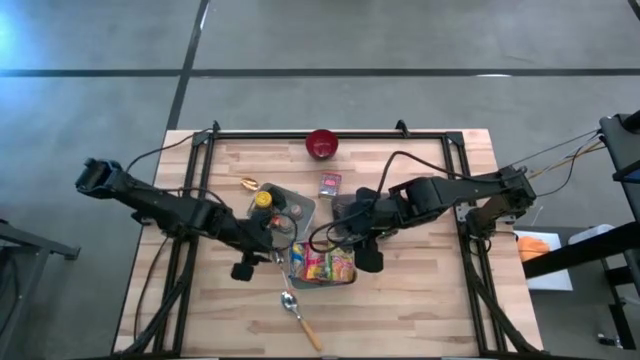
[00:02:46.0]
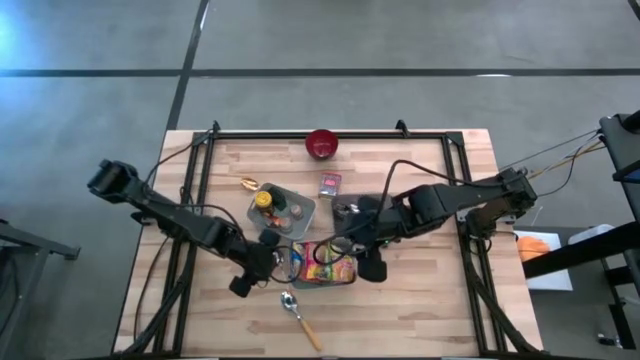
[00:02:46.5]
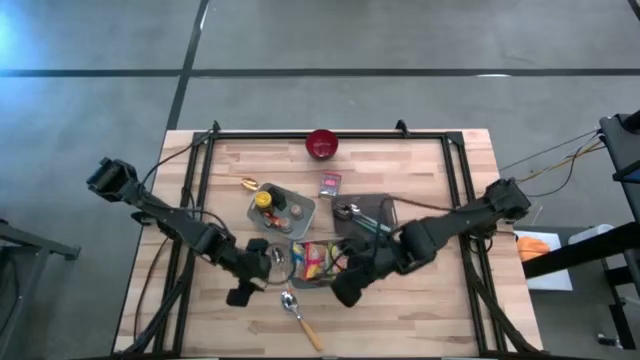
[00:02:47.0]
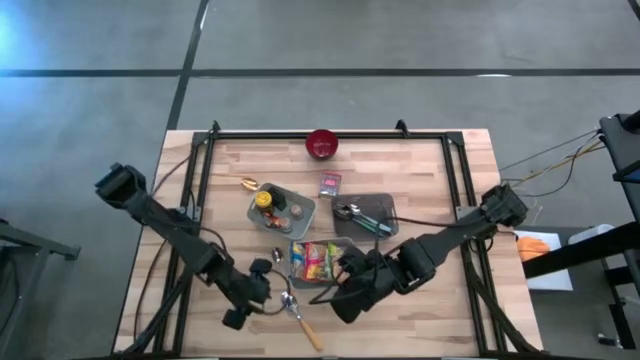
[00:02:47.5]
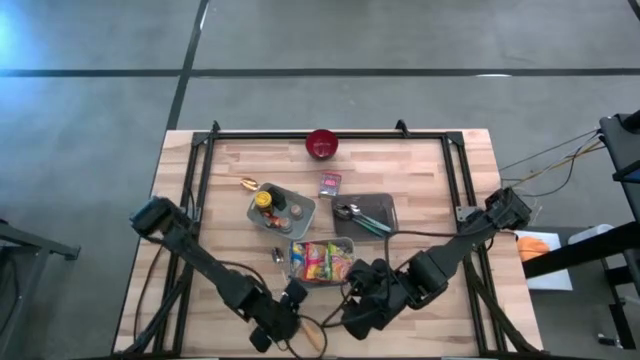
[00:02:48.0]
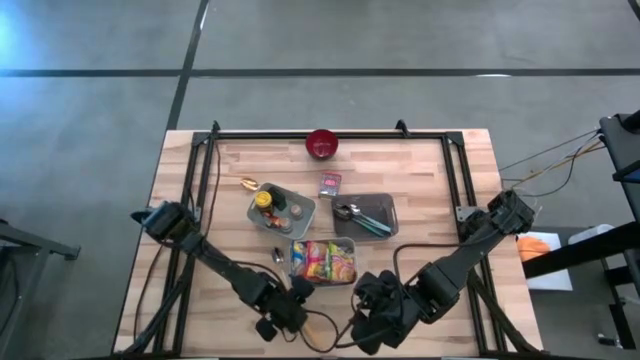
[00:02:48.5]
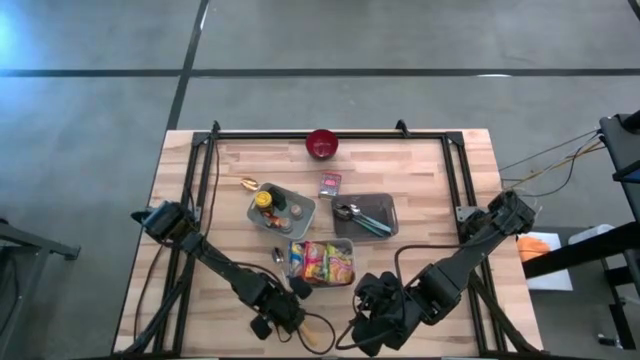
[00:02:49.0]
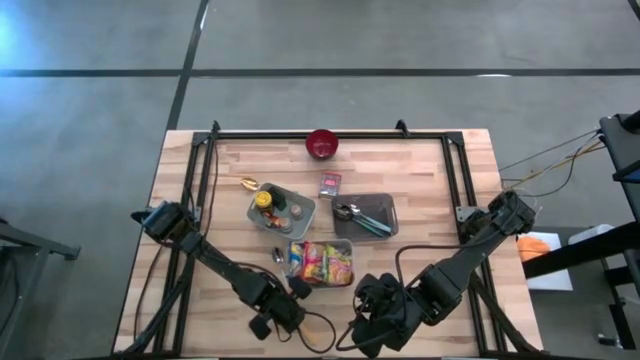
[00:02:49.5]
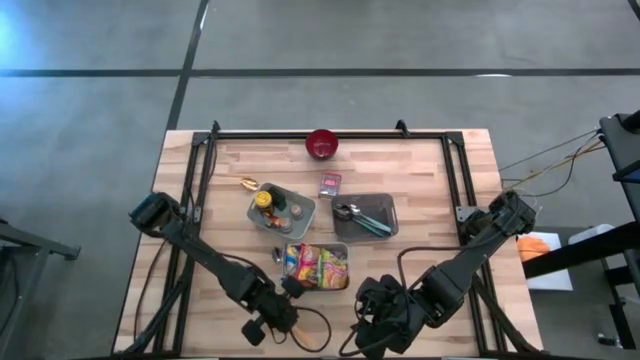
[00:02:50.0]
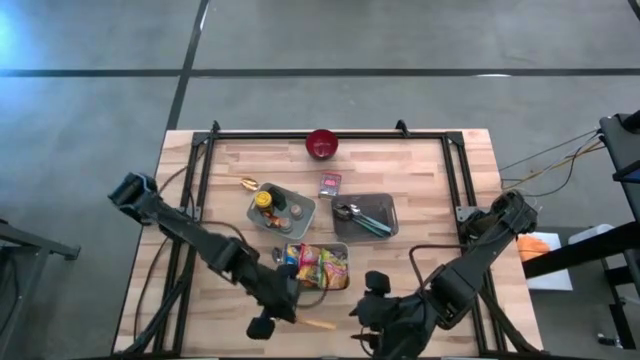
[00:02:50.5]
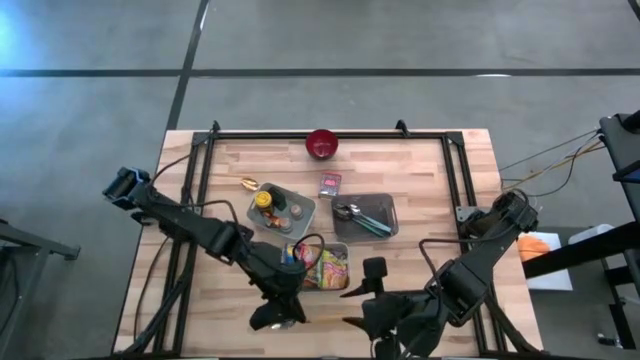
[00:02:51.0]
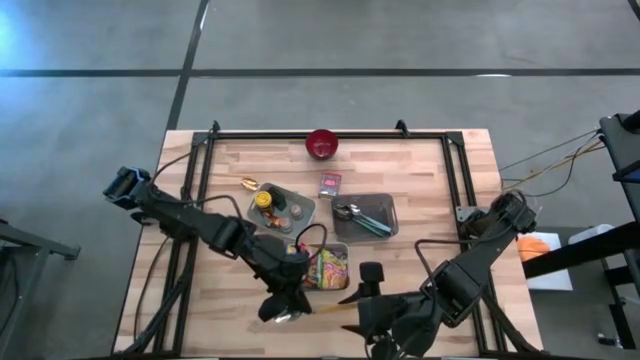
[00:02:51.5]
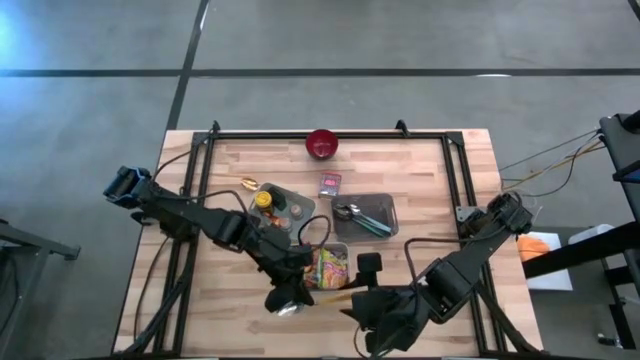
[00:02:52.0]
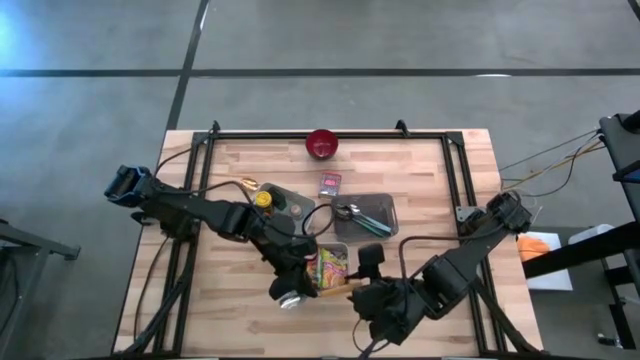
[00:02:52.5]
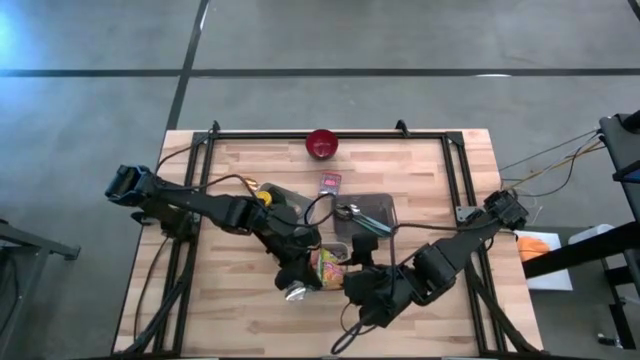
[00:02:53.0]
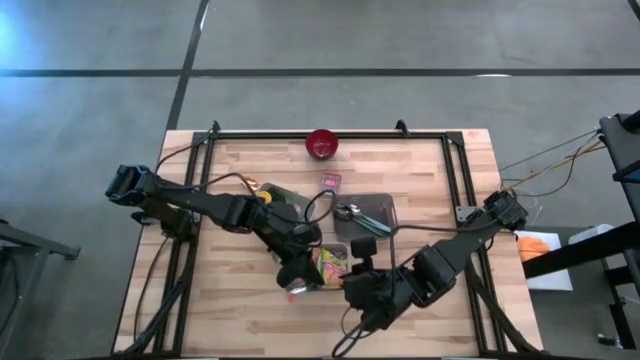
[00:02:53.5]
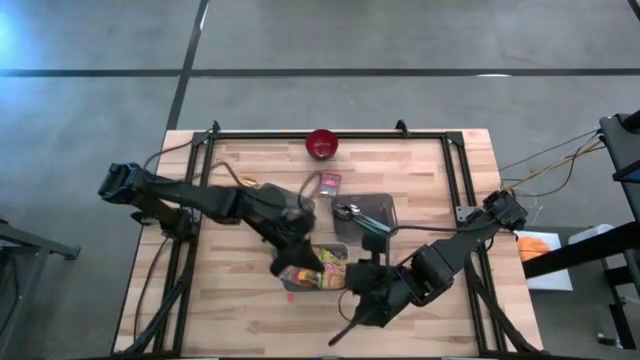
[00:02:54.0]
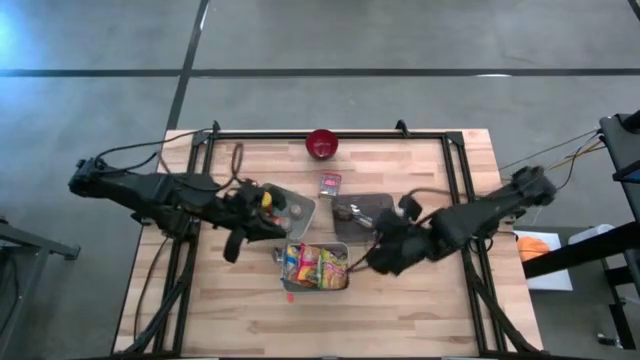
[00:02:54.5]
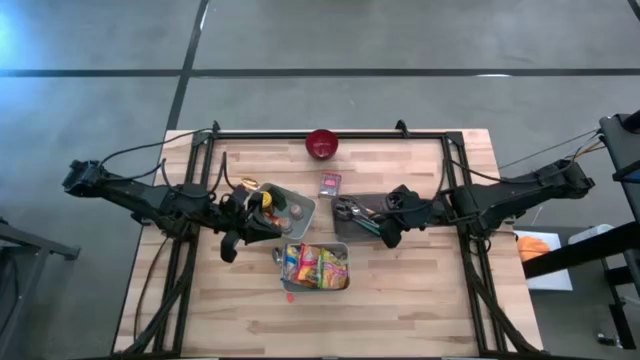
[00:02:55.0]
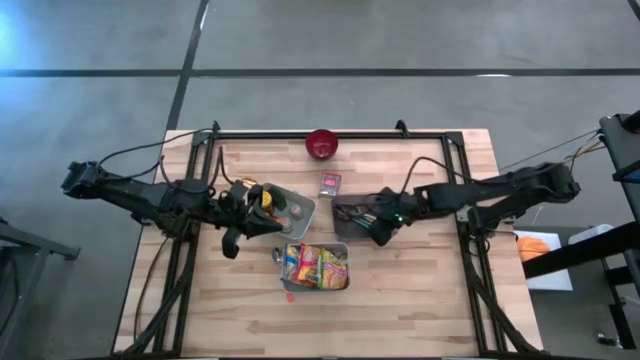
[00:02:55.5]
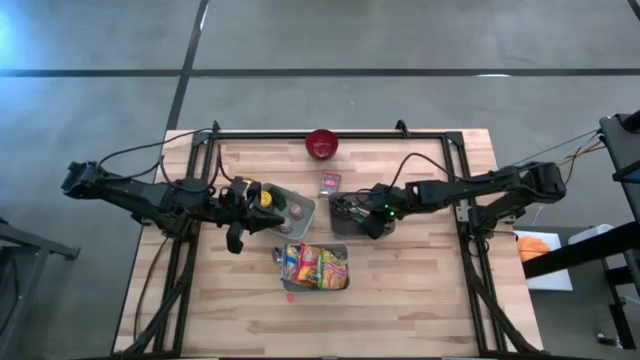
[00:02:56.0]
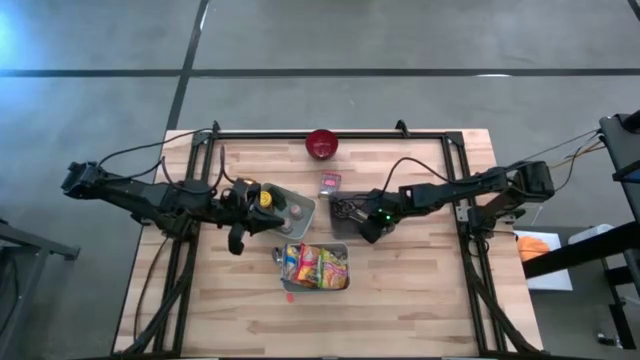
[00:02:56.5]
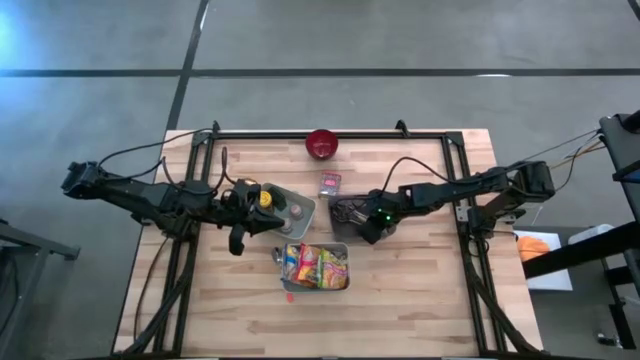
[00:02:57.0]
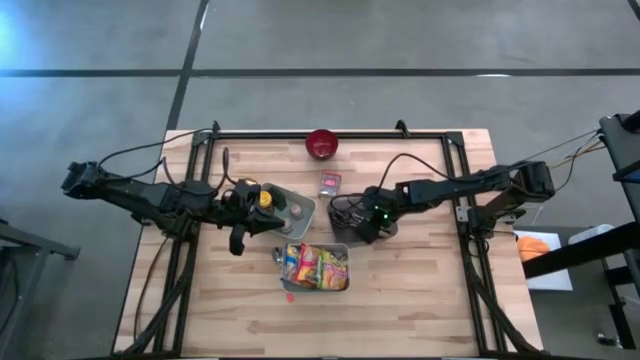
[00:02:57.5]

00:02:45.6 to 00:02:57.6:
Put the yellow spoon into the black bin
